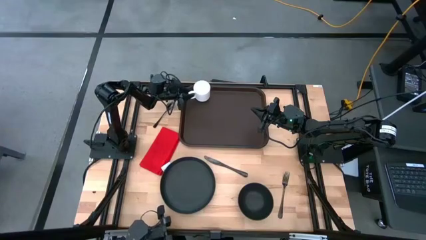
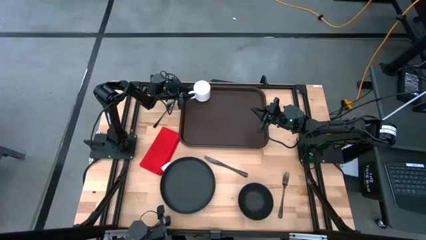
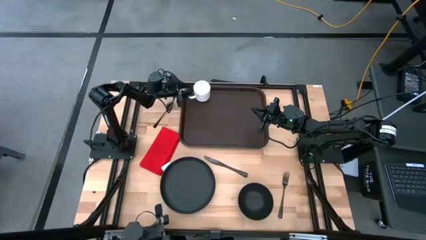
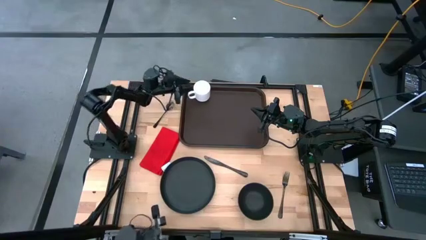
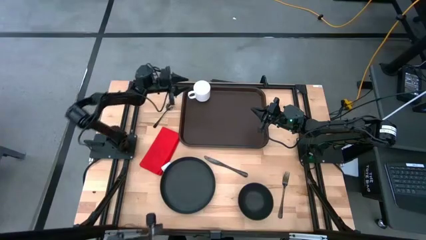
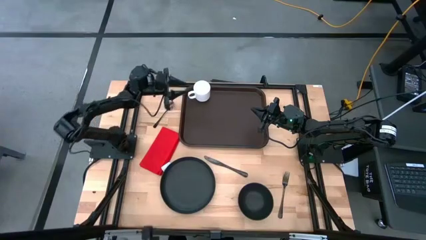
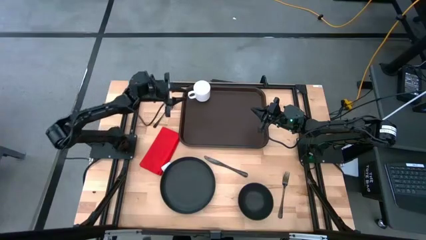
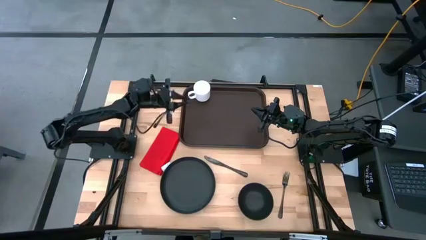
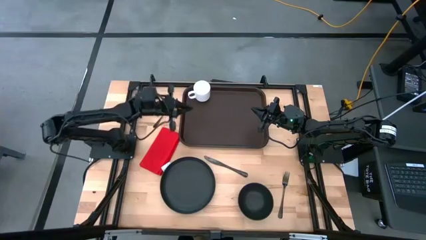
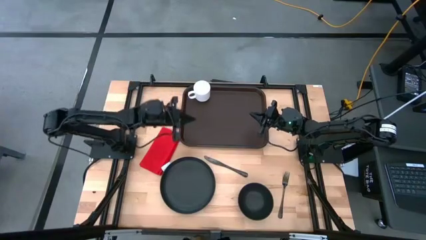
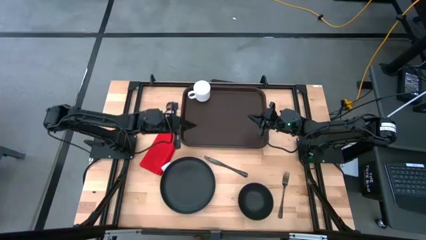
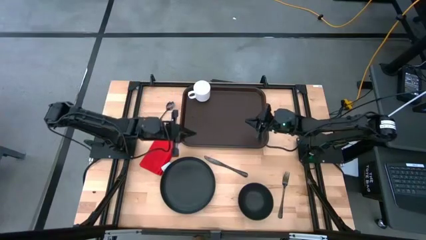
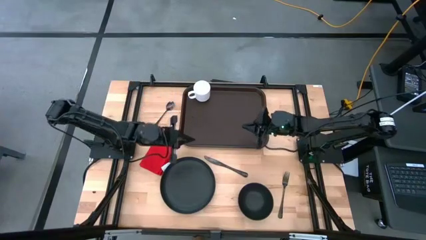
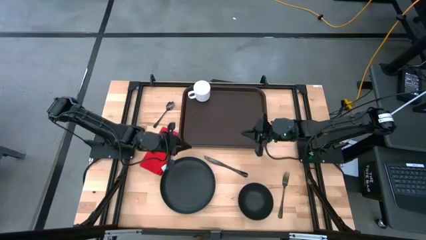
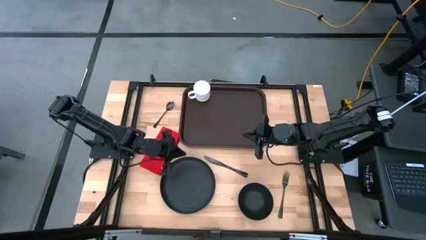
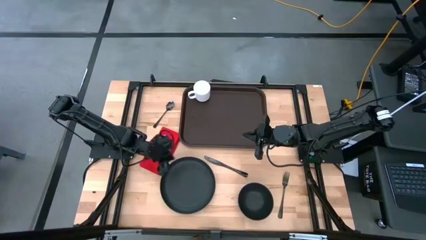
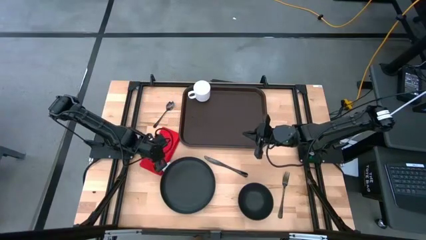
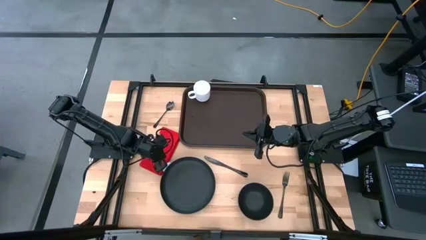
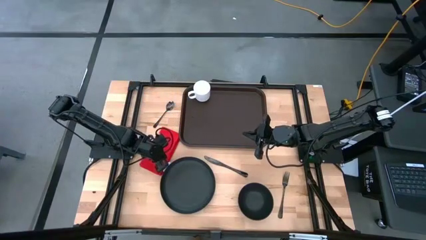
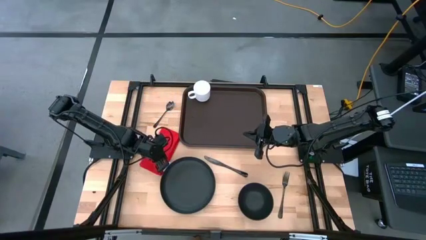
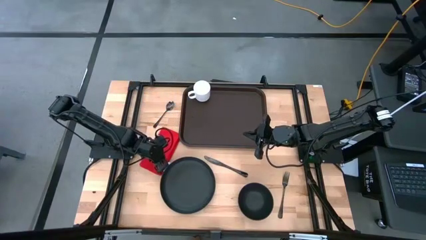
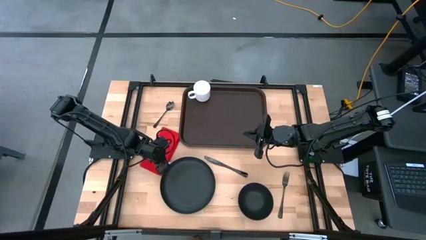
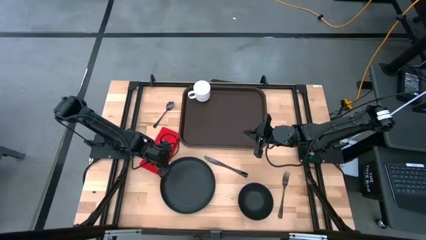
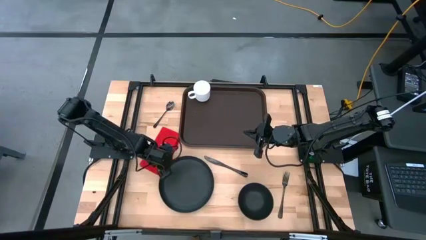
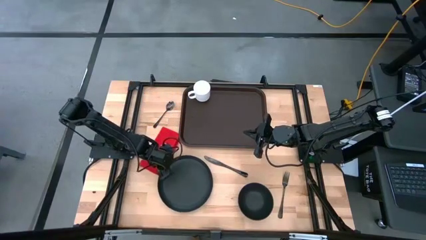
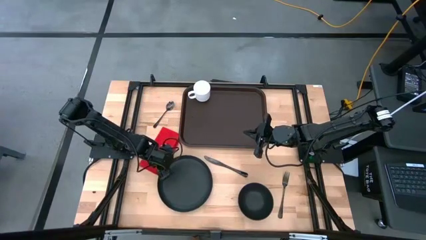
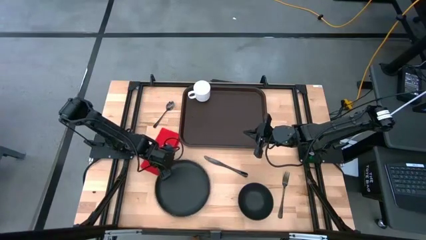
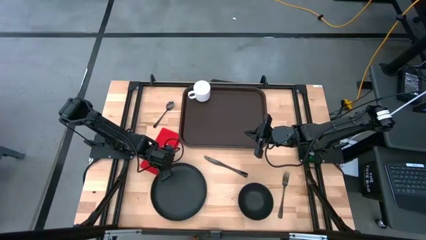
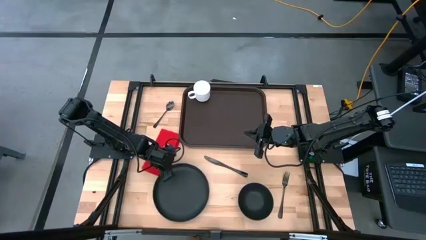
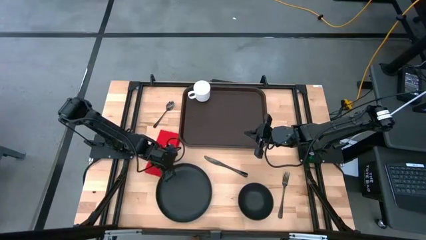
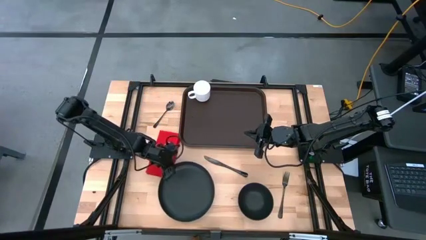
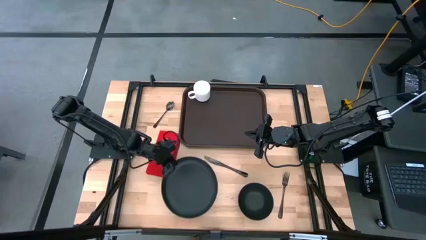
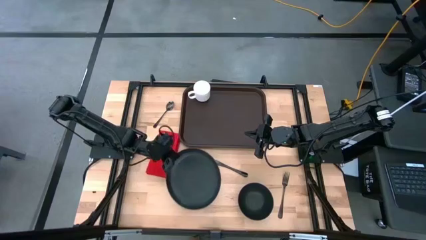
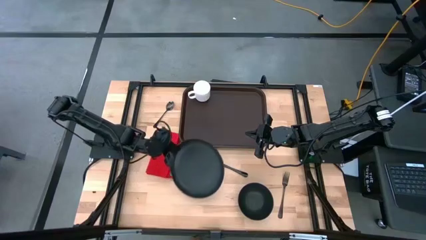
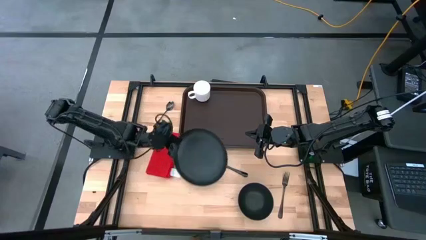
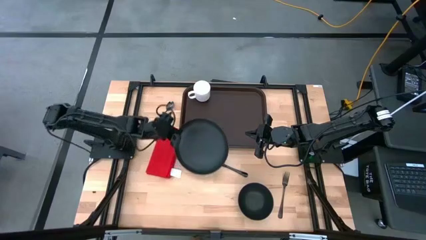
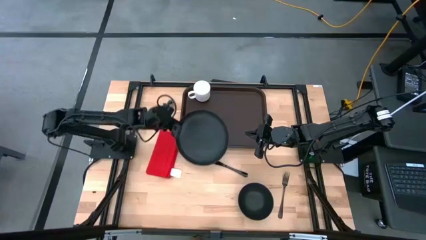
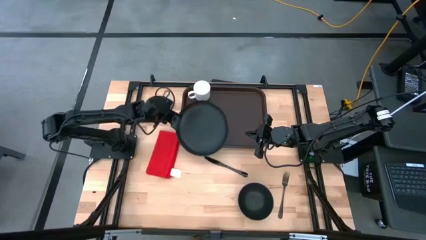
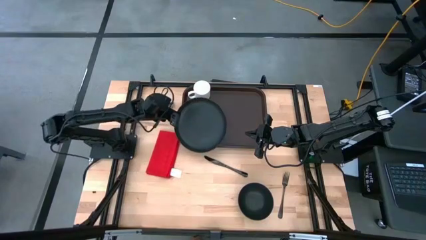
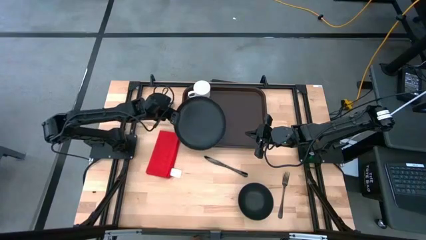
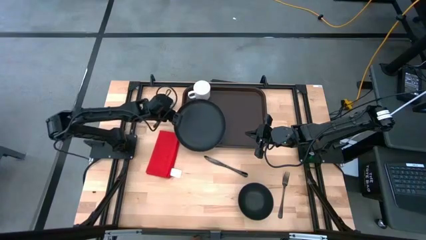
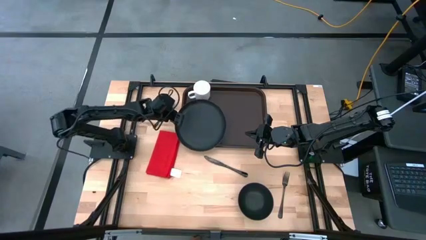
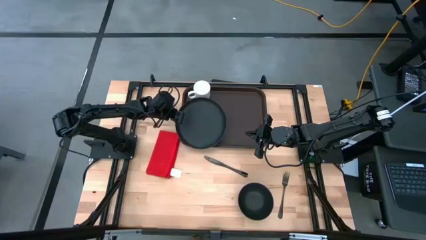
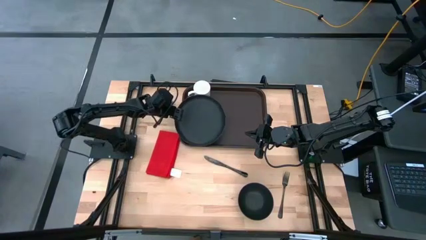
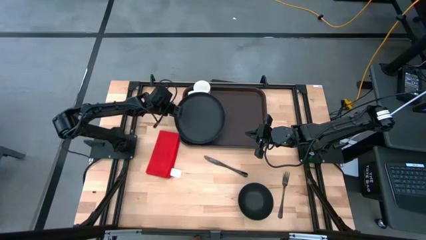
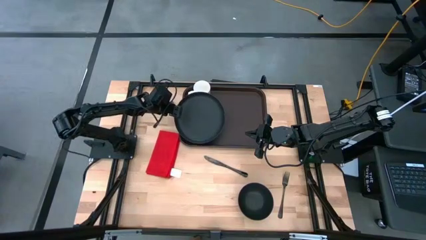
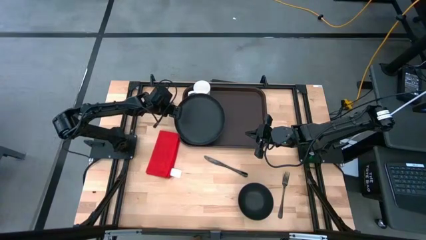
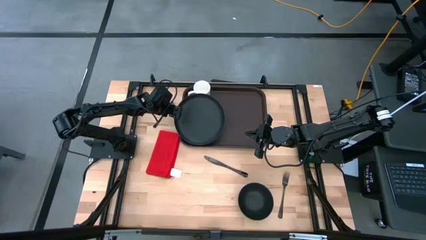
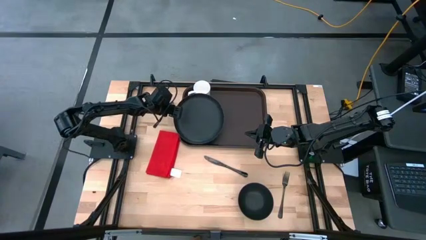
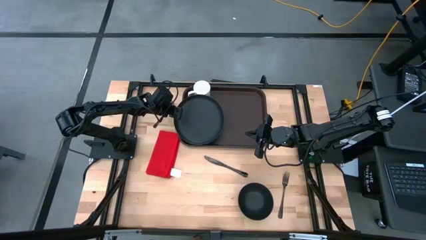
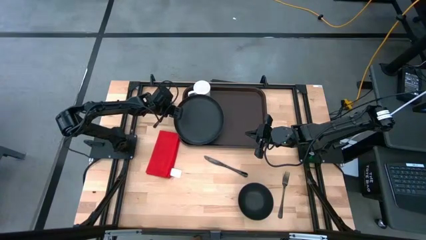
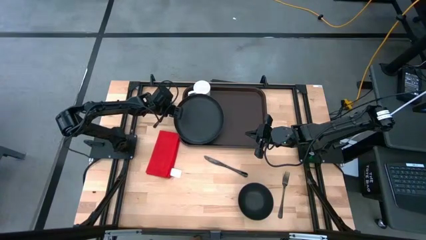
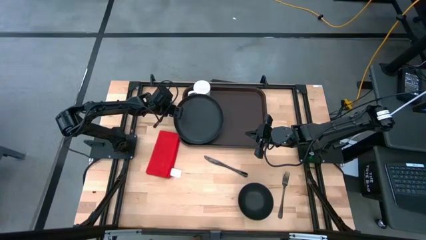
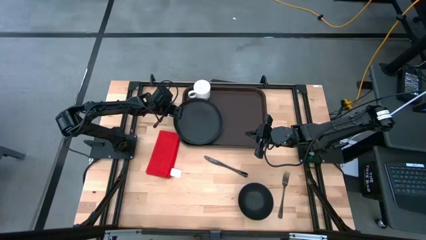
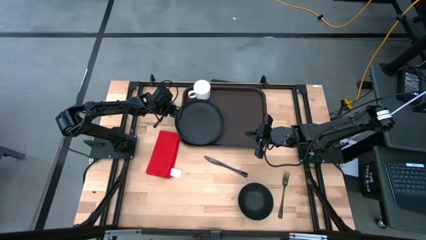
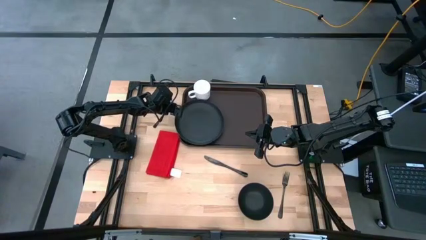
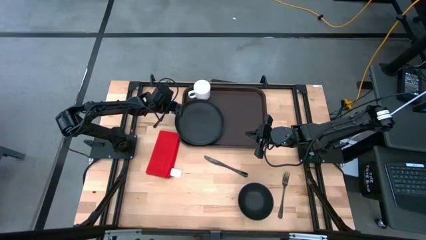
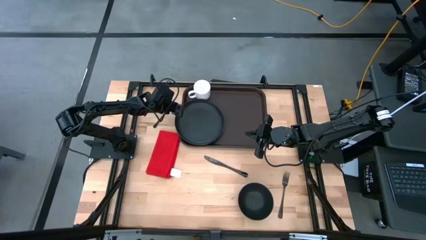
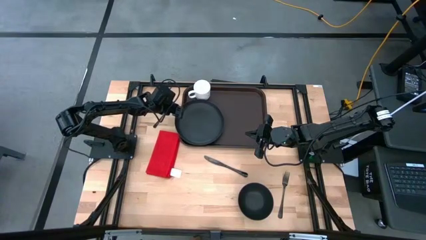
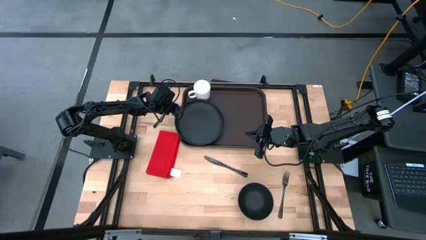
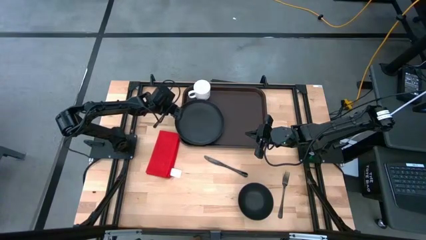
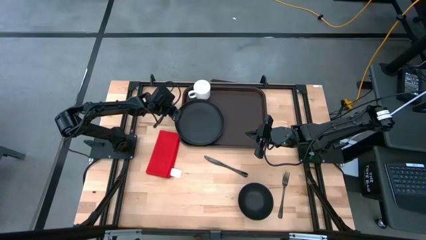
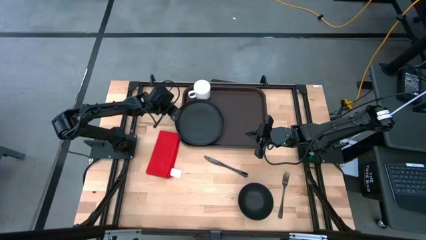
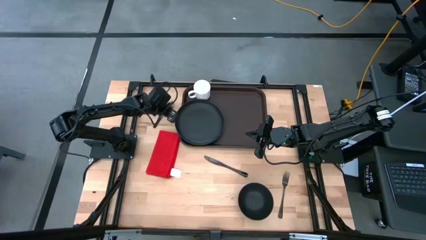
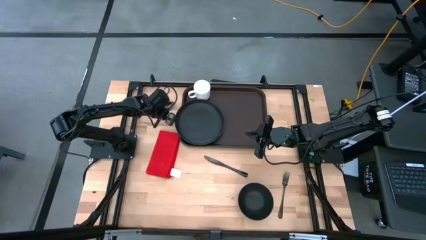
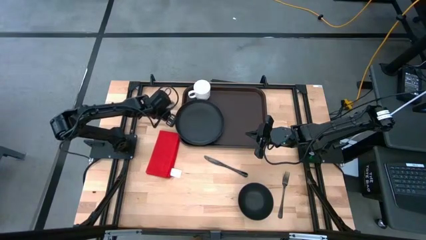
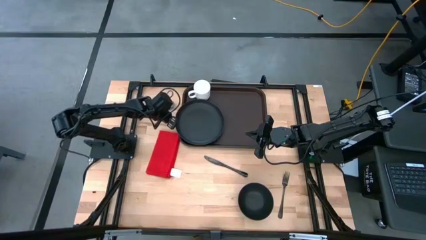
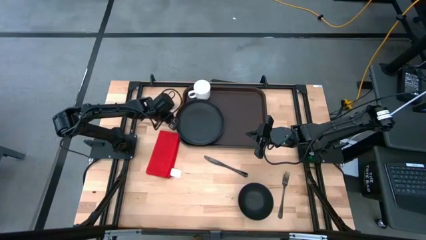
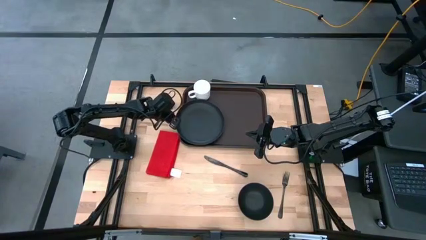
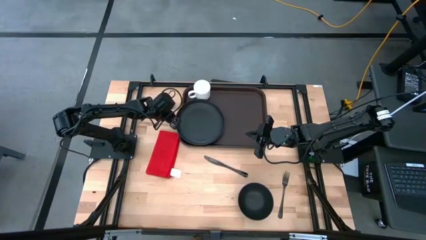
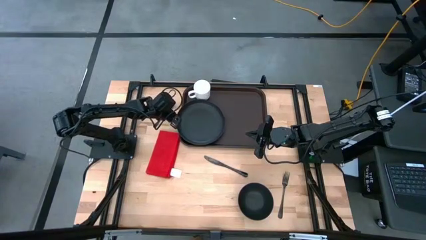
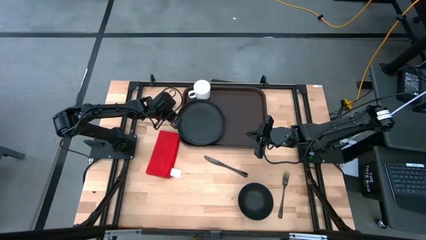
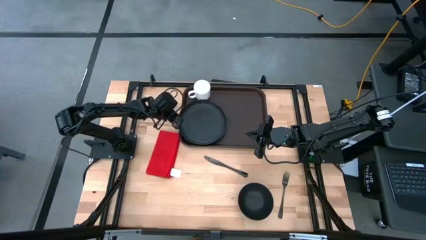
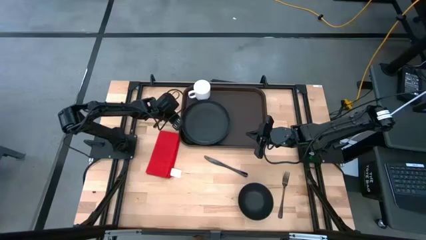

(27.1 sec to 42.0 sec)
Task: Set up tray
Put the black plate on the brown serving tray
